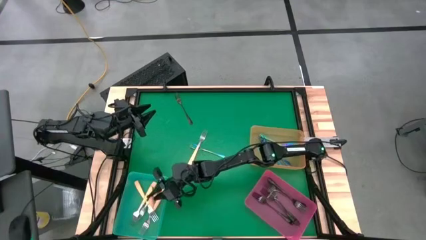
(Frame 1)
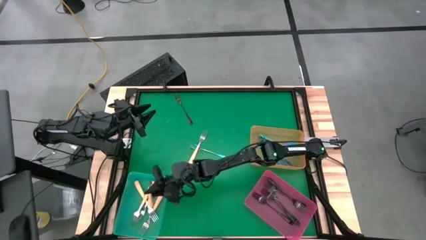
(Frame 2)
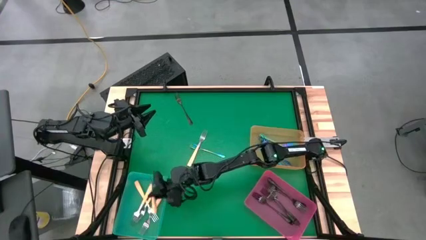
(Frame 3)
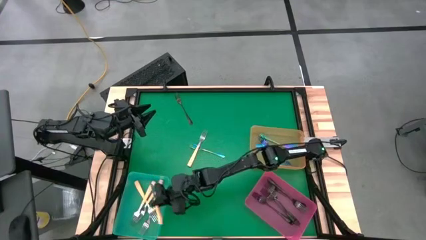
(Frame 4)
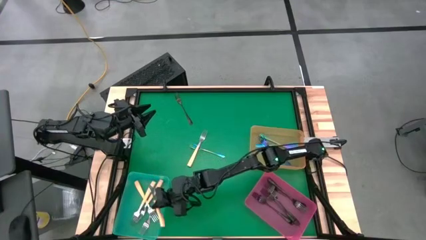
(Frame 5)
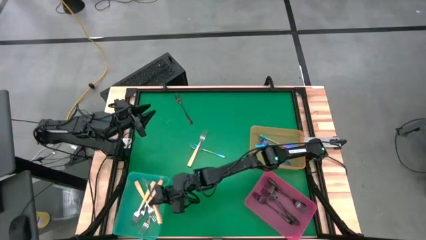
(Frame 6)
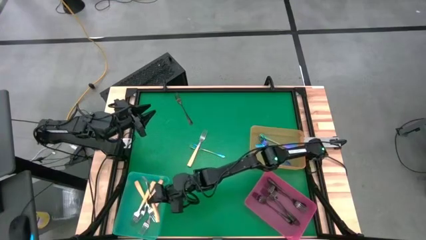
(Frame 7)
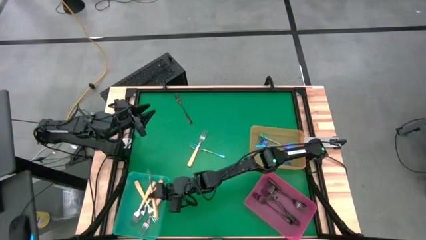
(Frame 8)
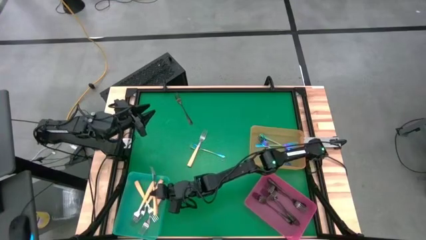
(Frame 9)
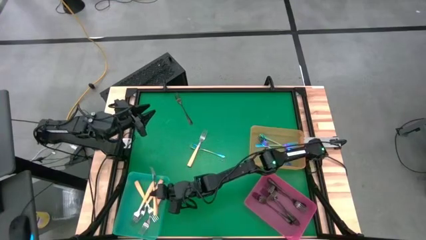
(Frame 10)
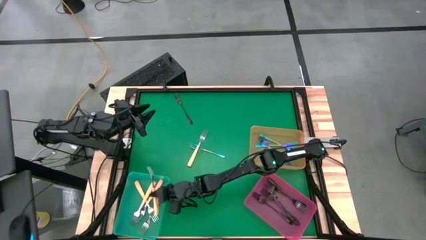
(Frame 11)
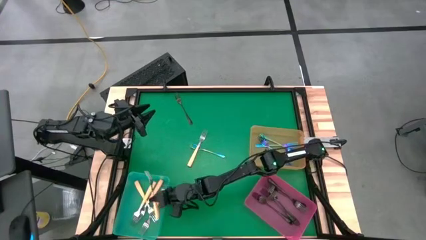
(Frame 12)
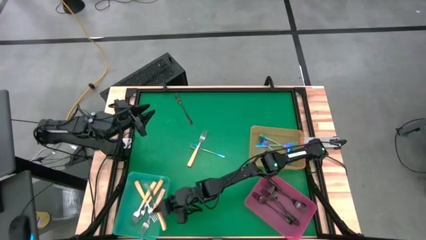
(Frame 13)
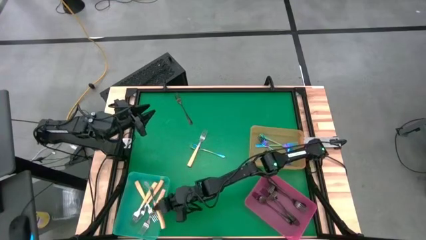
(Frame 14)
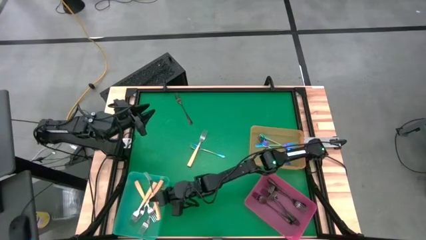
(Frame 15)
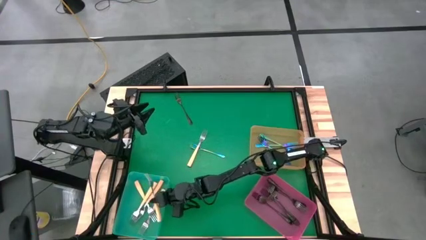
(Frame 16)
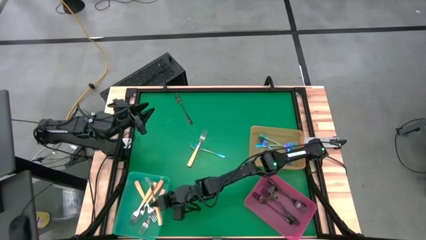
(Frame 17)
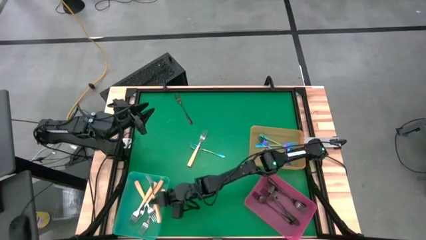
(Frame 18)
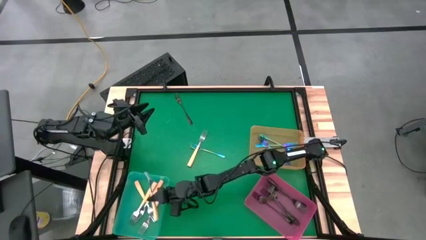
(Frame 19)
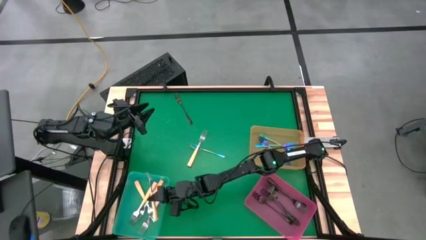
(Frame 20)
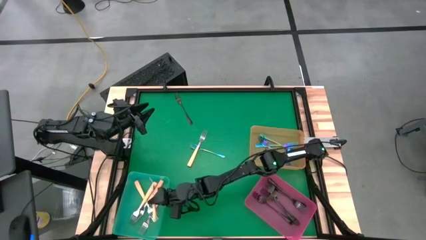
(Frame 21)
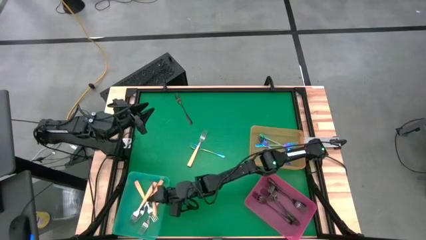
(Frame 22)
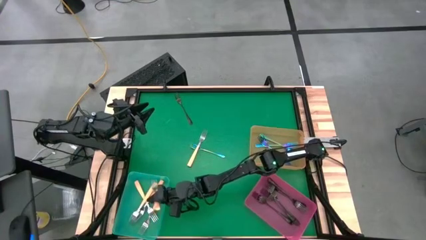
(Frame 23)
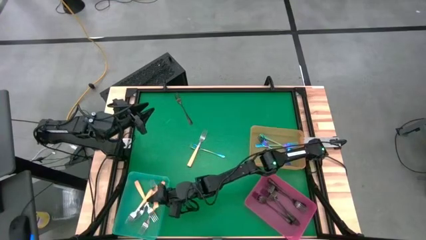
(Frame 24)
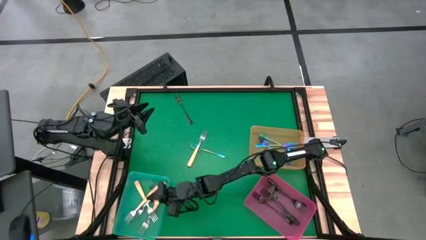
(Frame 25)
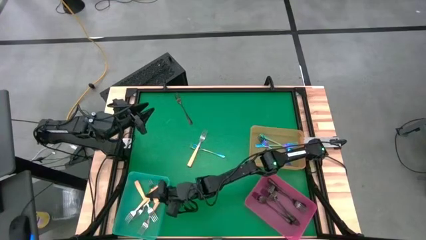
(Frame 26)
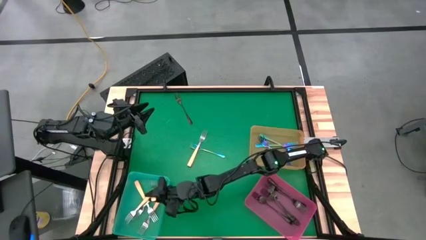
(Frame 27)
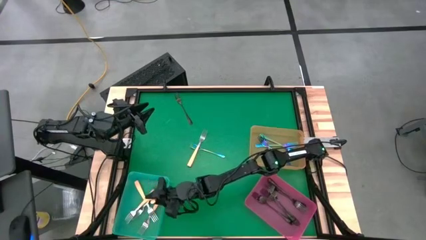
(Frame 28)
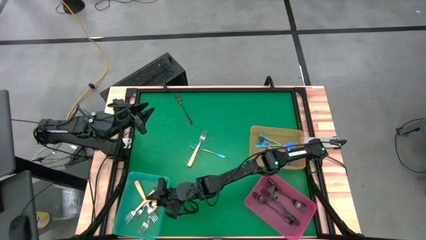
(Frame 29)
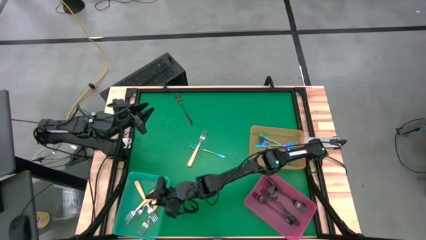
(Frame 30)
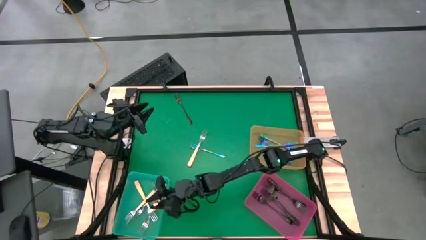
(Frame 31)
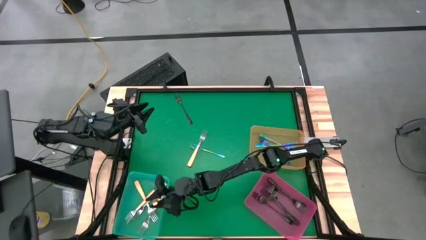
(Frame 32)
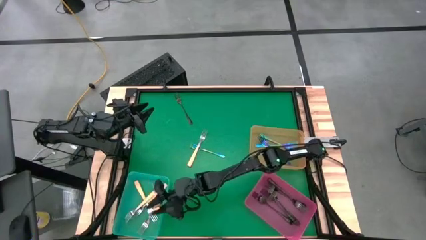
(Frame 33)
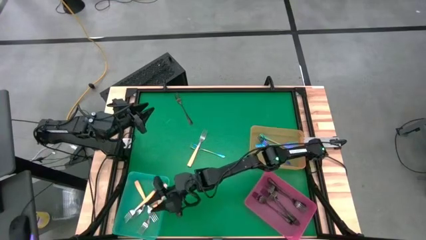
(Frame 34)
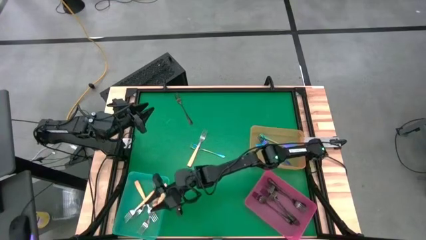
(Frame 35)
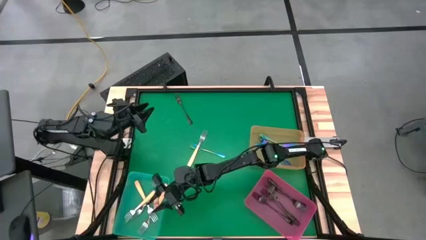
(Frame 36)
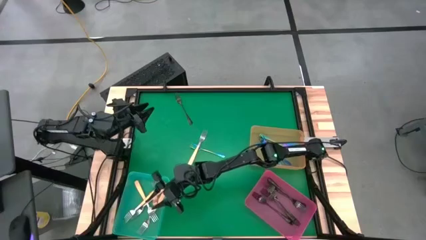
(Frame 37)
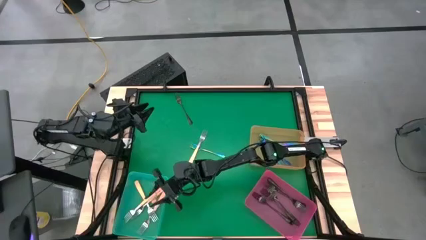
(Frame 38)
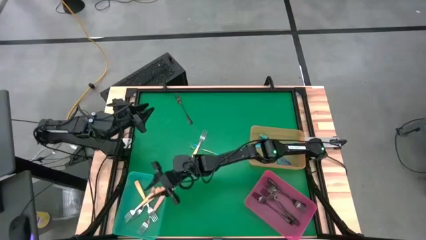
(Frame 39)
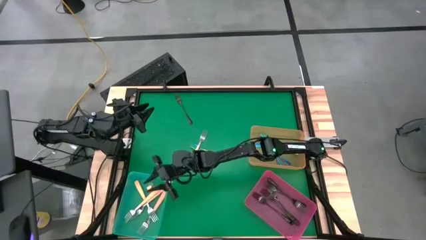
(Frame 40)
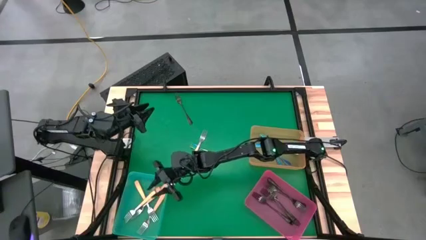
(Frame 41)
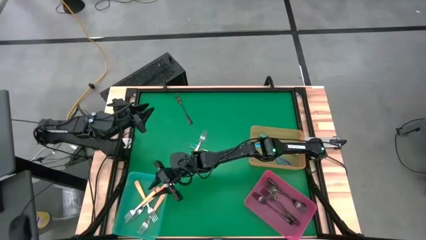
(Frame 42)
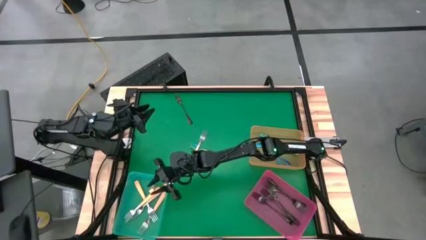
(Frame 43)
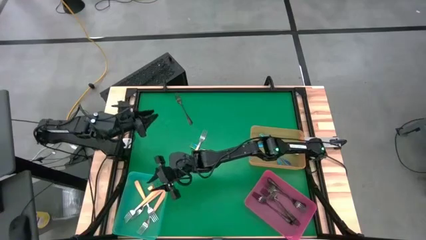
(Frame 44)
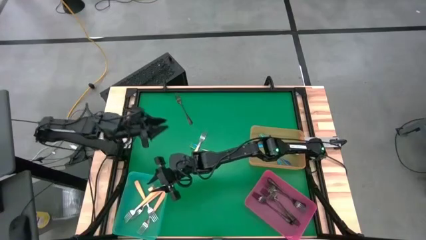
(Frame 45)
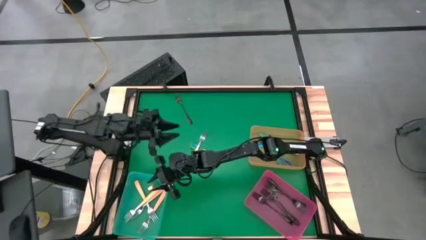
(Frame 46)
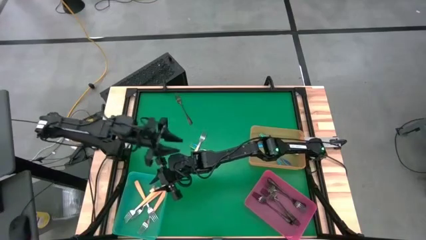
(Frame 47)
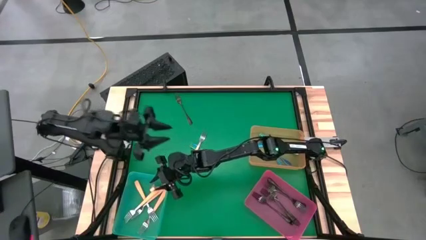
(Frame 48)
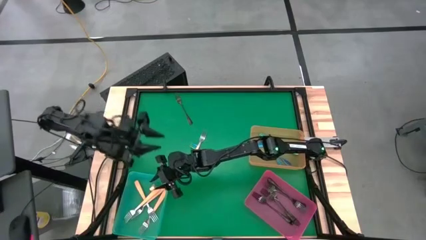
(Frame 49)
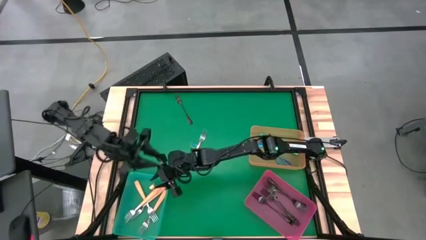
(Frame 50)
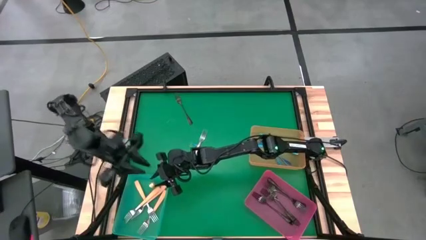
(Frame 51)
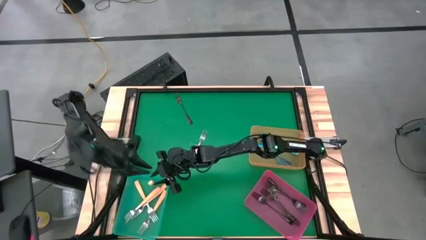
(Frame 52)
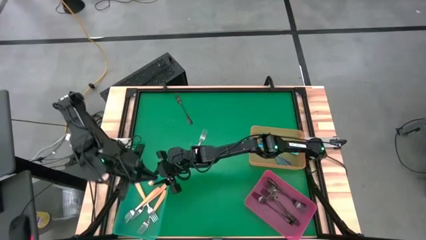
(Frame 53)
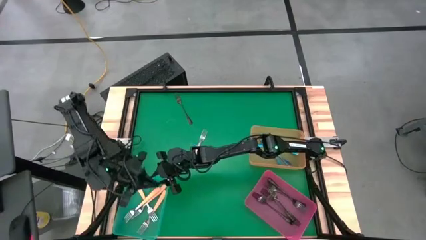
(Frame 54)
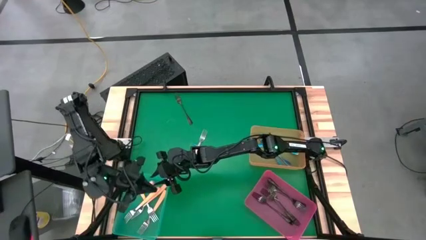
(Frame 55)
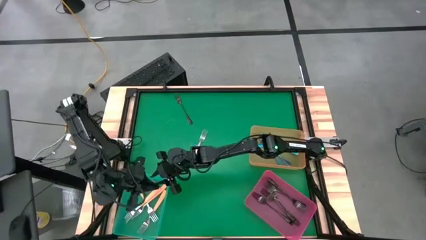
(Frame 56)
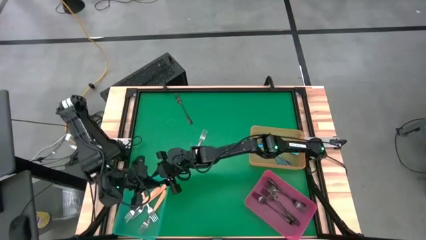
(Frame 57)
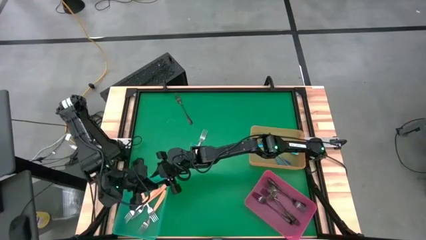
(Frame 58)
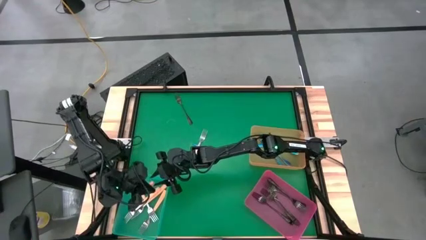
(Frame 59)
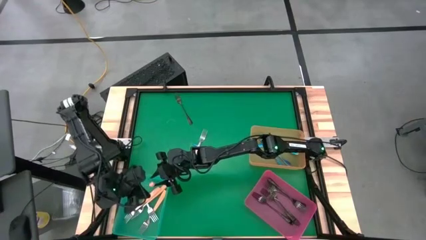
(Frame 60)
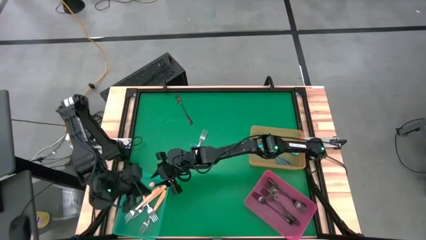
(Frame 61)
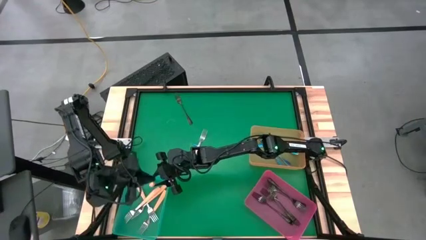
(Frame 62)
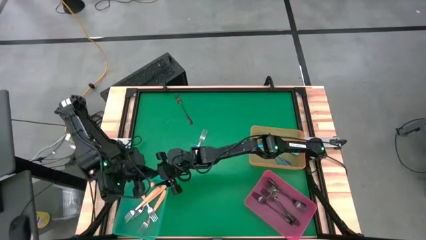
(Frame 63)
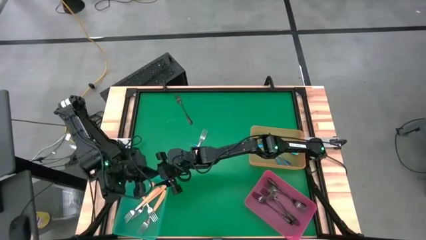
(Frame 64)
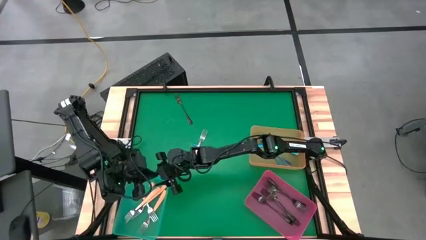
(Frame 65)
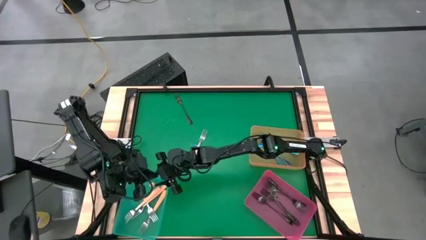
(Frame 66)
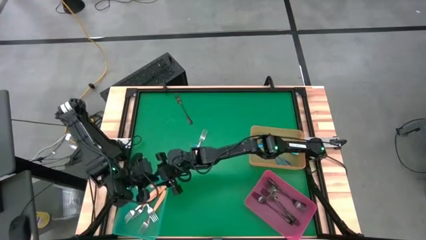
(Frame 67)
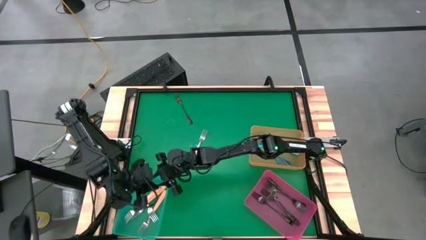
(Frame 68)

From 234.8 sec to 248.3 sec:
Task: Sort silverware by color (type)
Put the yellow fork into the blue bin

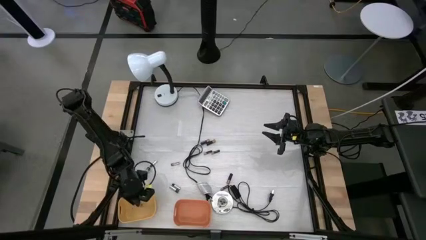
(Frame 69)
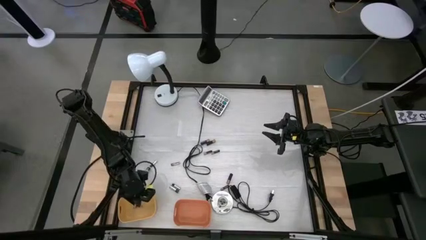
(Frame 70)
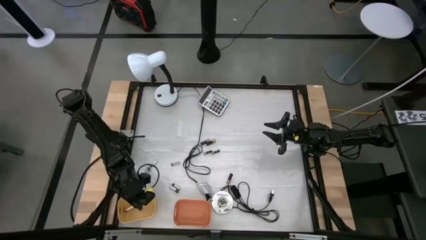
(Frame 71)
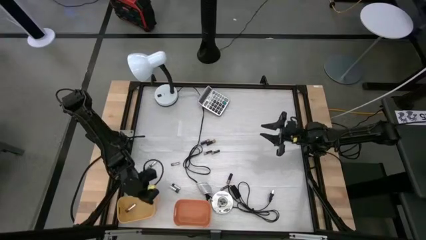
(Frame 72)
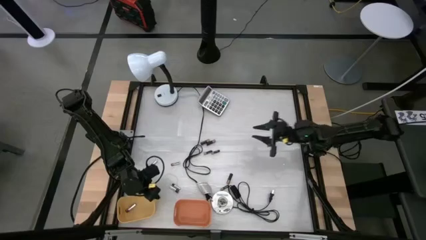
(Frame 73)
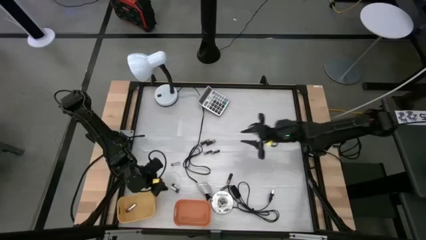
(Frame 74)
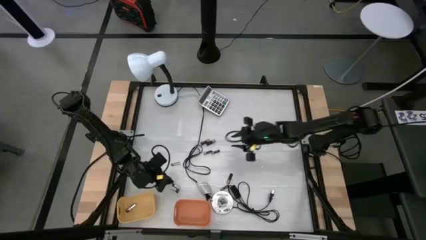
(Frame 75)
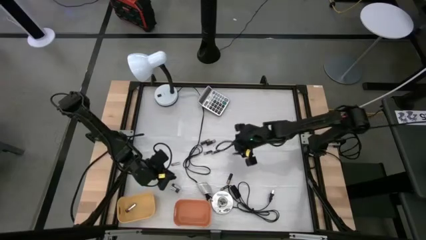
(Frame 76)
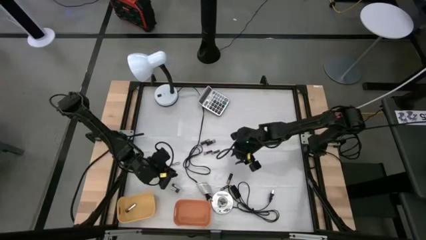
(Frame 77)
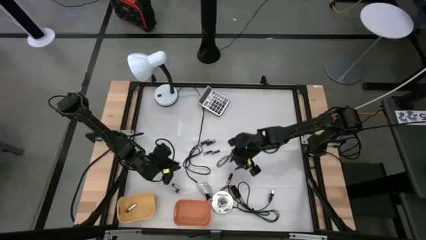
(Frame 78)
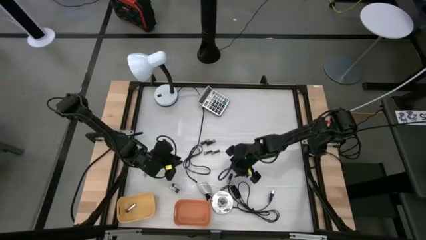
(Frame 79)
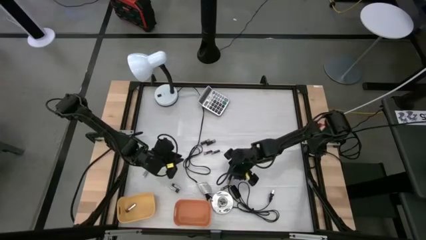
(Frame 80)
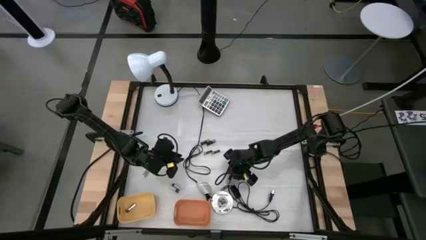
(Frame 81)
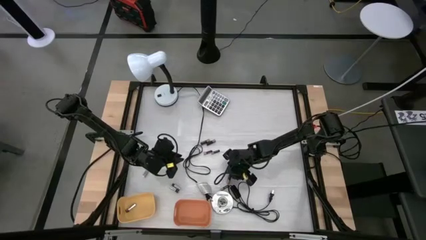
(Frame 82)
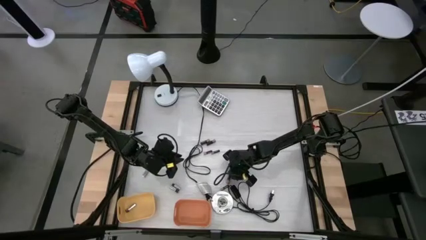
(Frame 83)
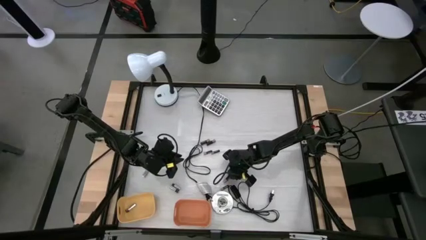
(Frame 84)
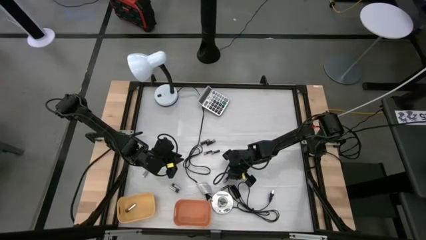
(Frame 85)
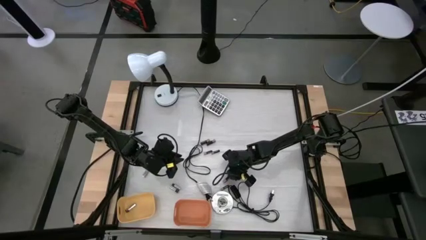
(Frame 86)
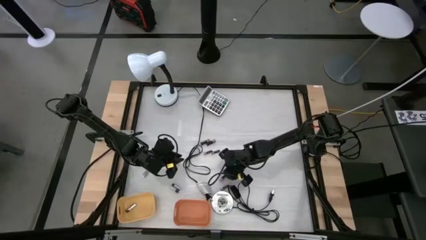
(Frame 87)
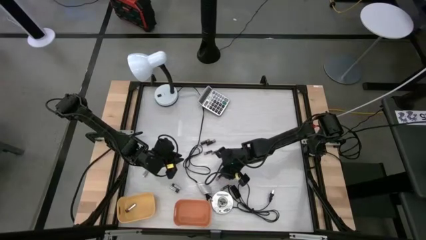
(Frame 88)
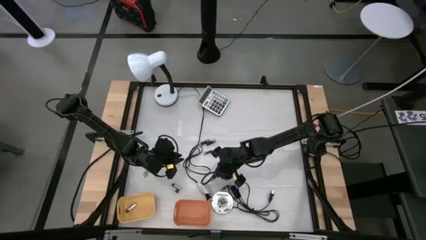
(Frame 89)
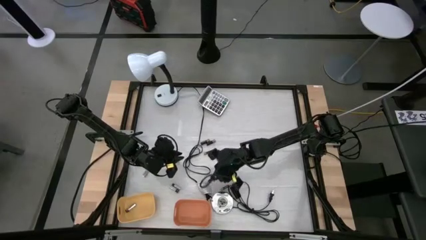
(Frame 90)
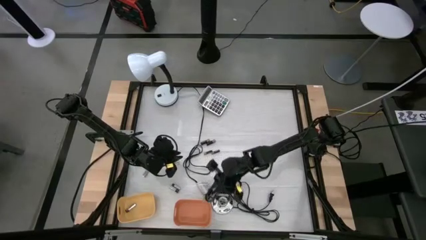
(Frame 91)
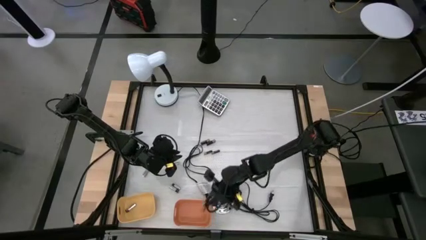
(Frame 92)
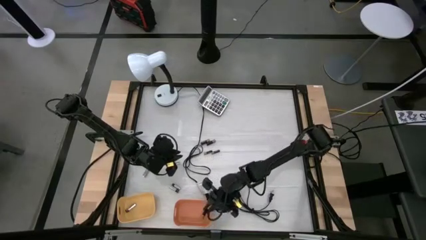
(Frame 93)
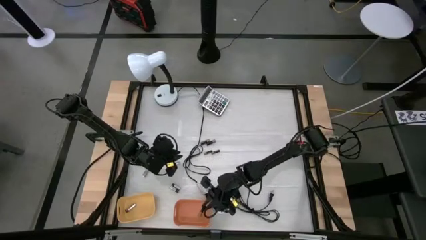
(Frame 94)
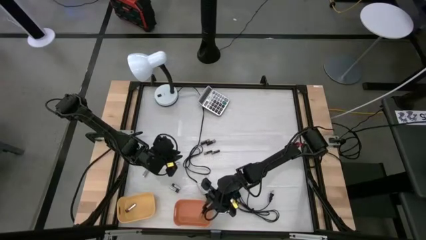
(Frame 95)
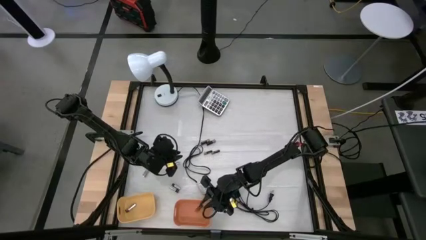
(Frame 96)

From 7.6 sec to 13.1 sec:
Task: Sort batteries
Put the black battery into the orange bin
